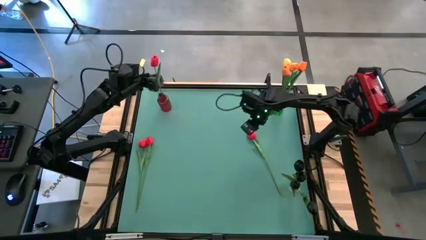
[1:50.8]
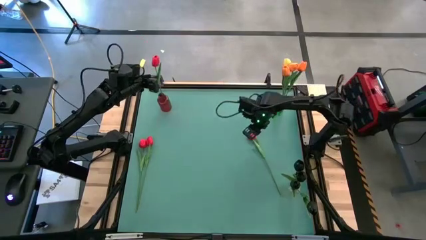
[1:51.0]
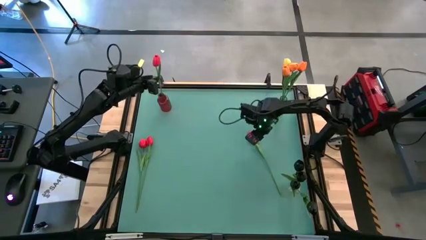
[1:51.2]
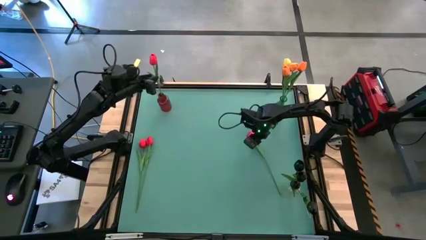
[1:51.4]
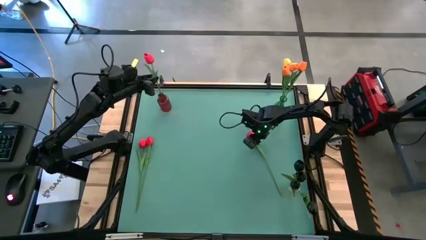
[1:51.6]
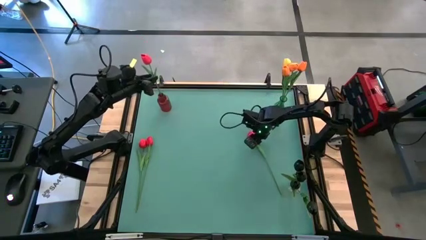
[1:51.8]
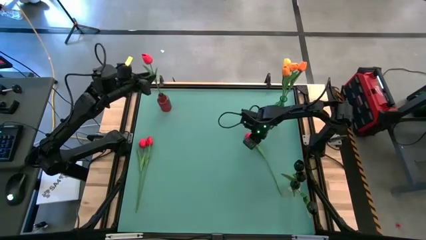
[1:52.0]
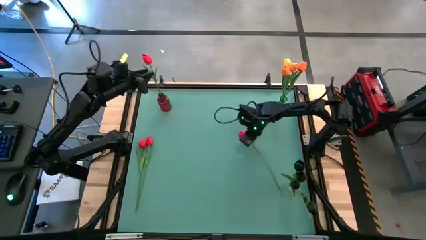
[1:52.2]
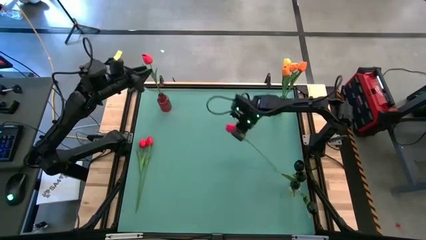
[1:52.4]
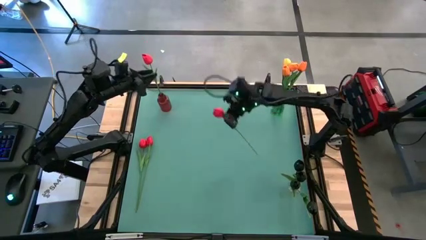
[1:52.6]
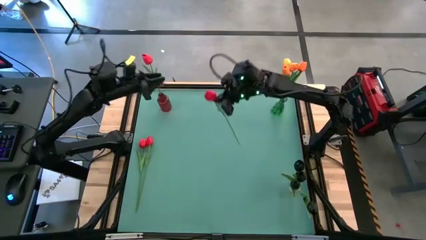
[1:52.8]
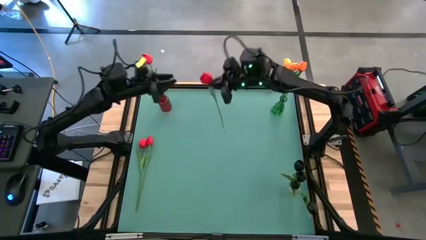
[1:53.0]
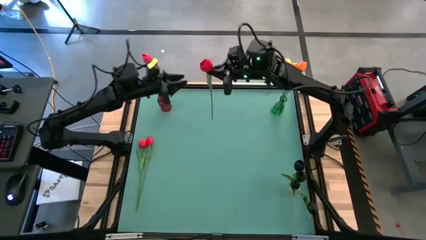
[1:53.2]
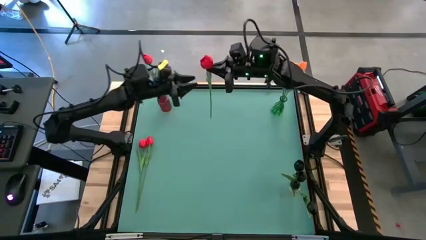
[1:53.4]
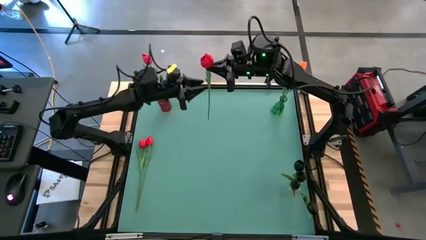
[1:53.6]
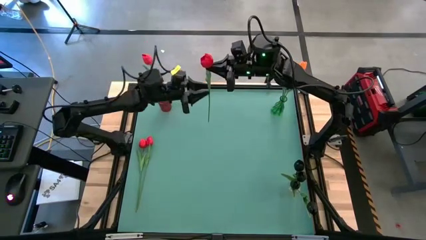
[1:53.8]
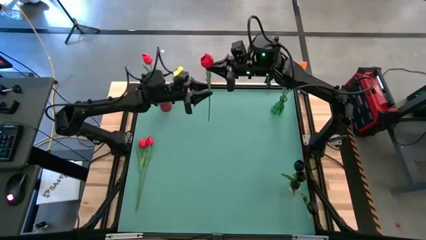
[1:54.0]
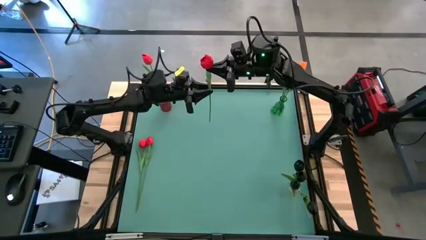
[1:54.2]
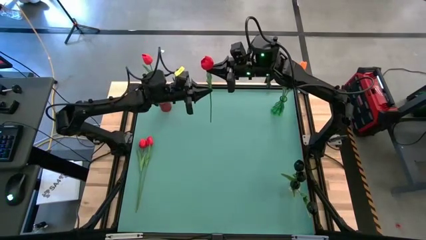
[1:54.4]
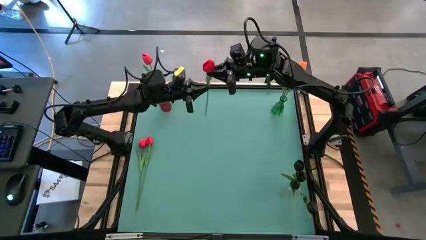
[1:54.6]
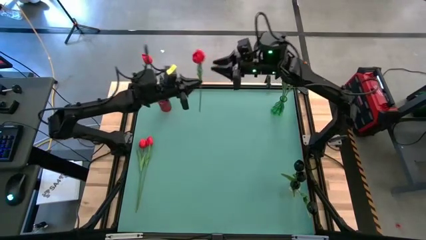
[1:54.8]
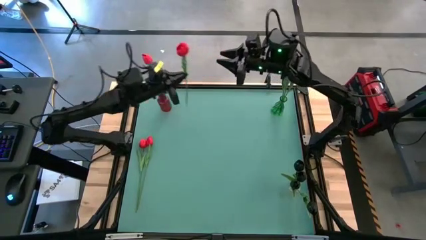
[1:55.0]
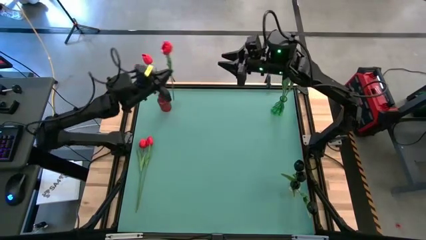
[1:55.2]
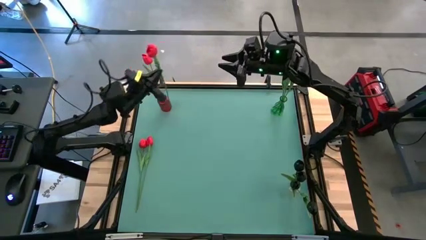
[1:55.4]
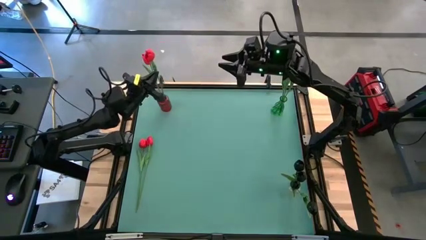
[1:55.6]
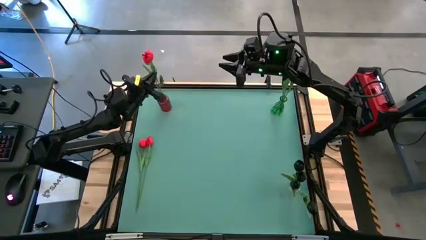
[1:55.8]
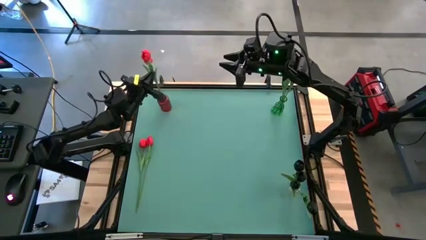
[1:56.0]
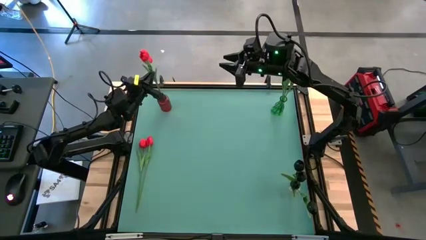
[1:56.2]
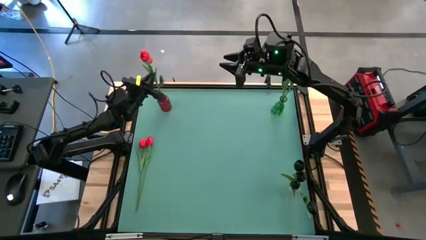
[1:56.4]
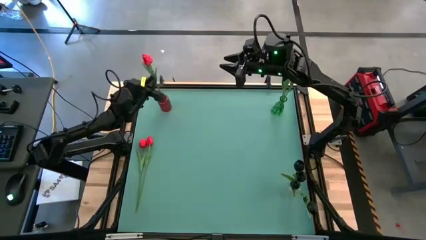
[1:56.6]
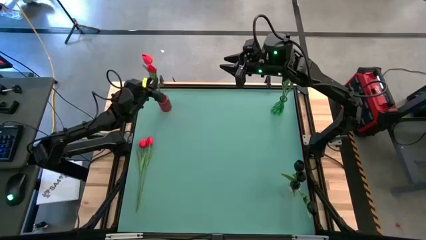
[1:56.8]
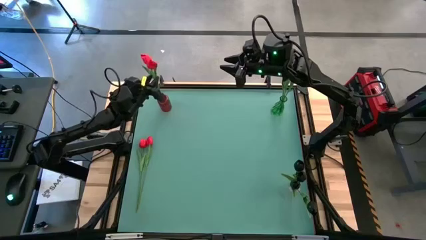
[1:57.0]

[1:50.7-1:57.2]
Task: Sort flowers into vase by color
Put the right red tulip into the red flower vase

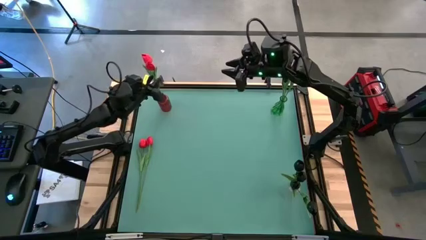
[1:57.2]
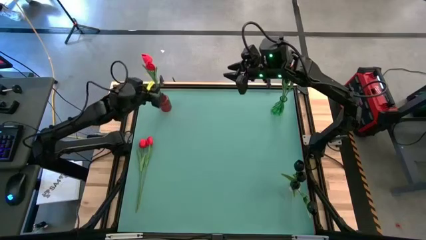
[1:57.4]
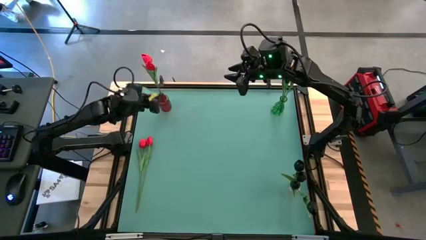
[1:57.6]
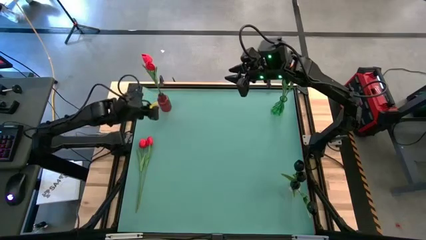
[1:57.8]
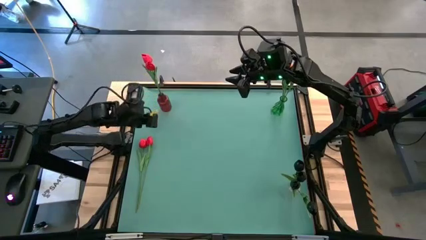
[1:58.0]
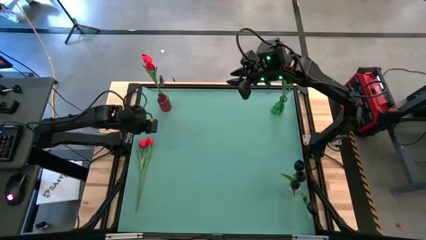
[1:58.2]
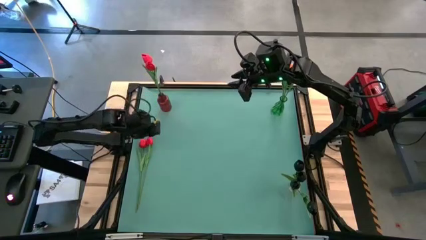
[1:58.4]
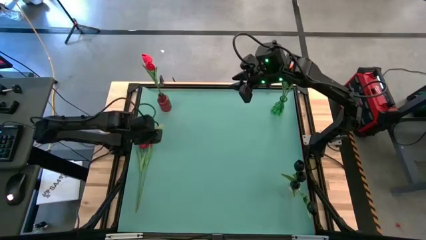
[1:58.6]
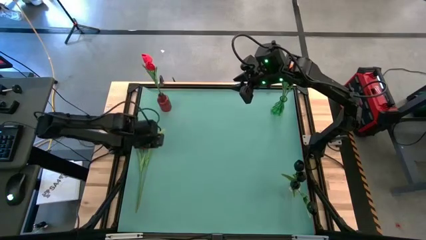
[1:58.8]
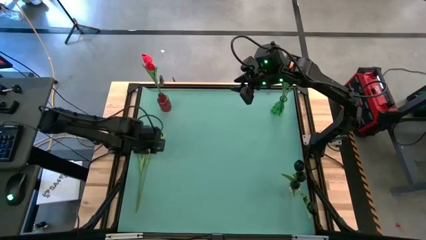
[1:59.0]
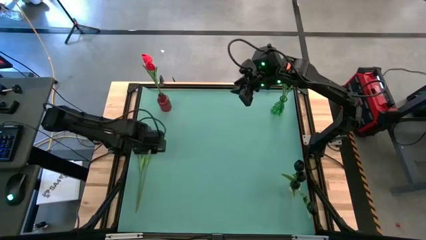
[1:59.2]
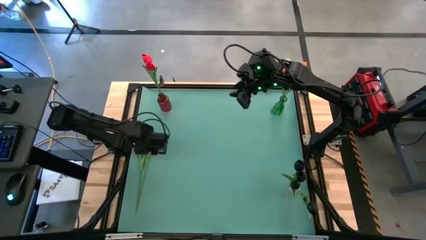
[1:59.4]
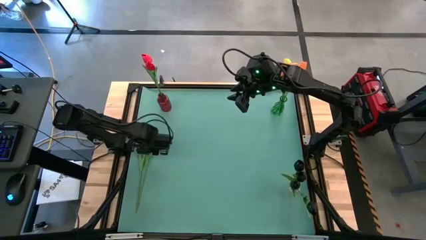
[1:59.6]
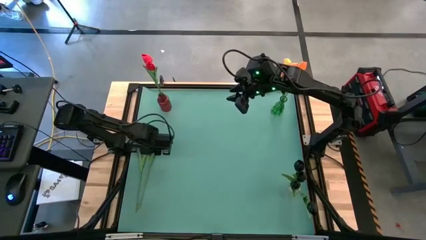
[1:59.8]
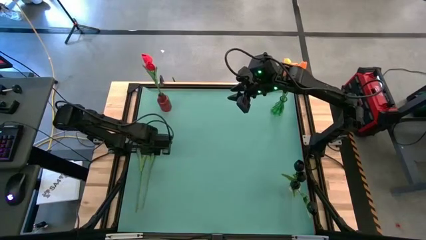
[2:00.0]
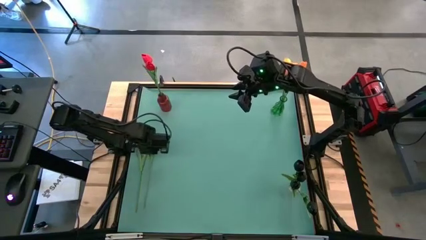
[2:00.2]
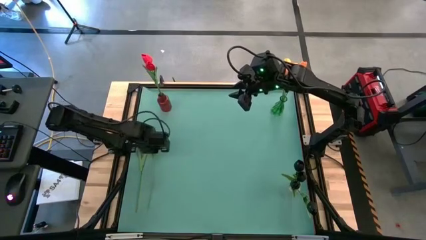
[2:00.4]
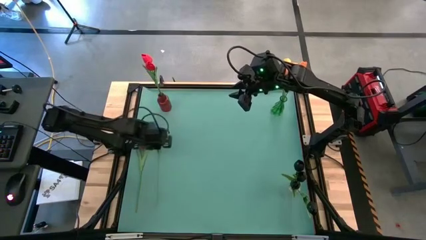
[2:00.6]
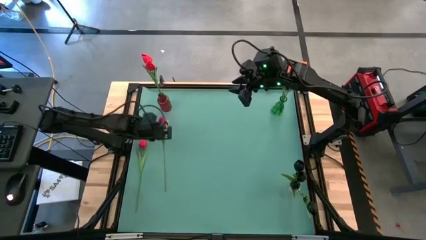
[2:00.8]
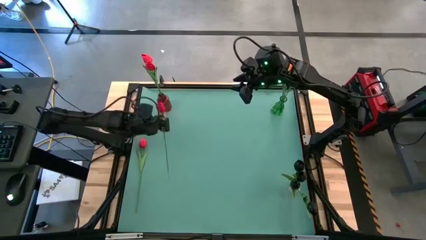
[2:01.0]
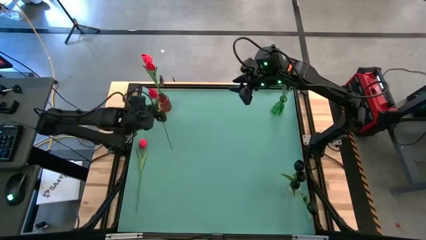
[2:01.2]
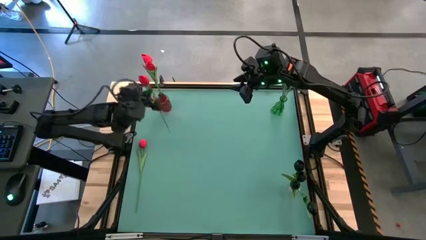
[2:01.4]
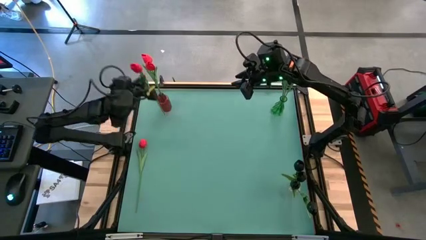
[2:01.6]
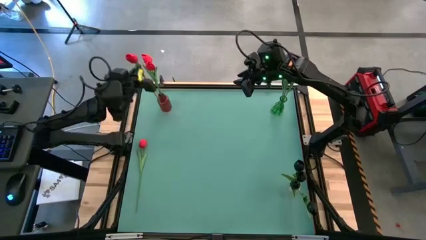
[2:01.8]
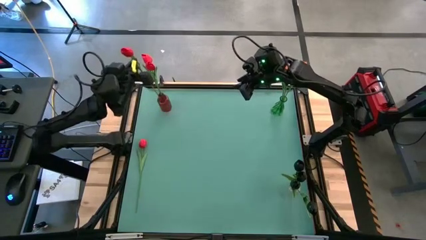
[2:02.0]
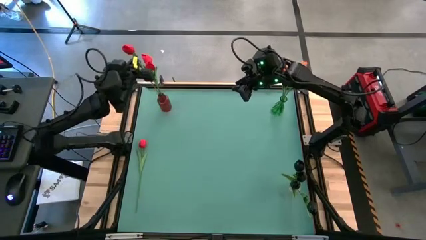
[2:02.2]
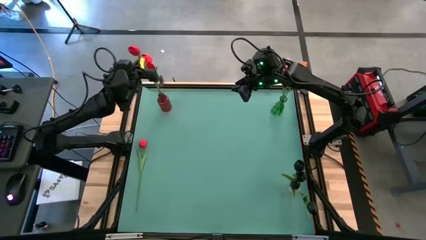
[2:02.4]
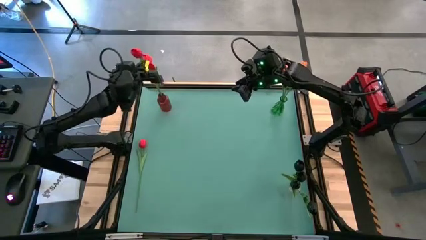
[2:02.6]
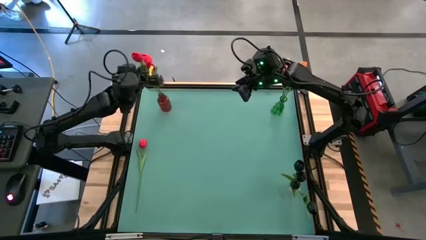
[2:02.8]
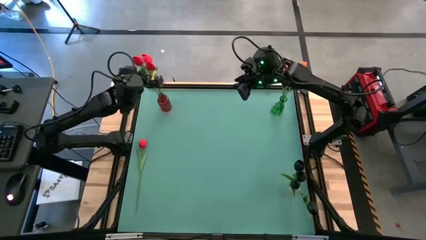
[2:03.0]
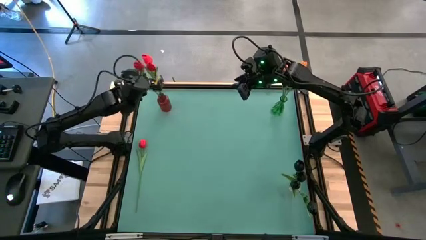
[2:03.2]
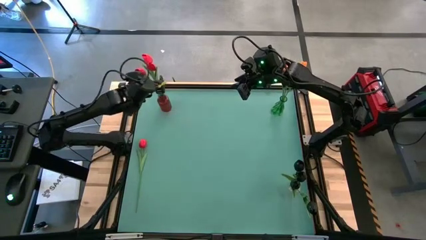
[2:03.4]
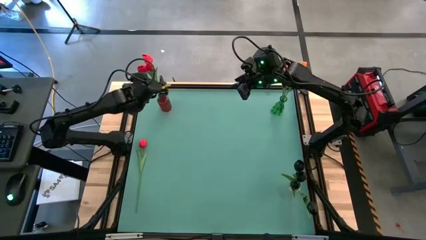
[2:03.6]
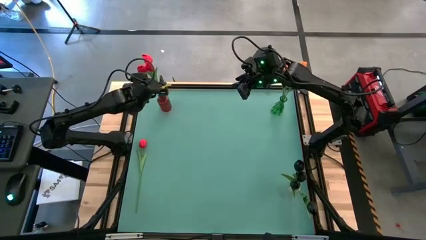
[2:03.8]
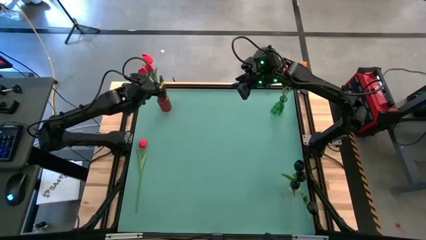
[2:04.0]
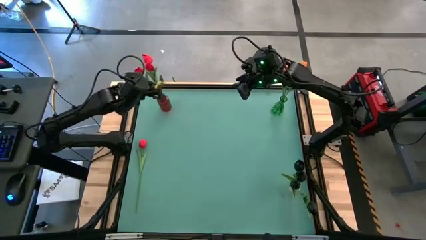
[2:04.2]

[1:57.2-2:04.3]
Put the right red tulip into the red flower vase

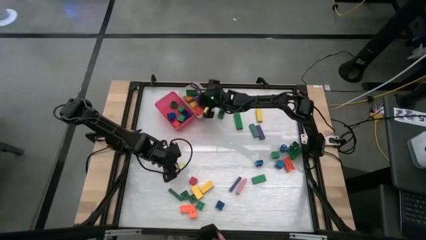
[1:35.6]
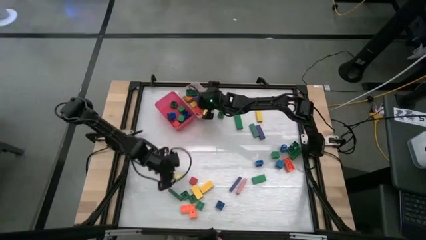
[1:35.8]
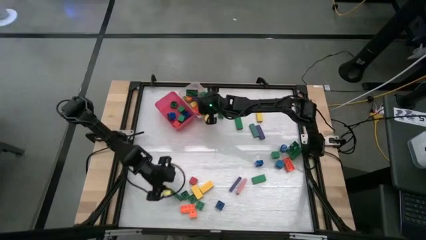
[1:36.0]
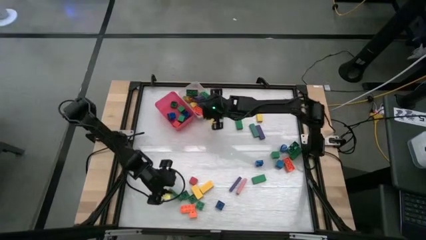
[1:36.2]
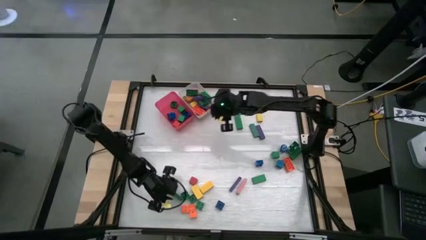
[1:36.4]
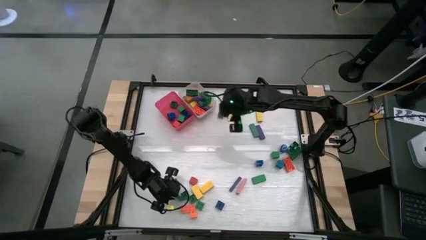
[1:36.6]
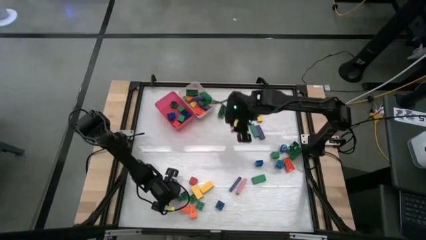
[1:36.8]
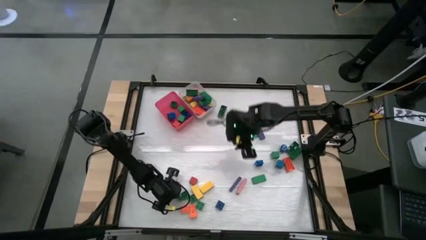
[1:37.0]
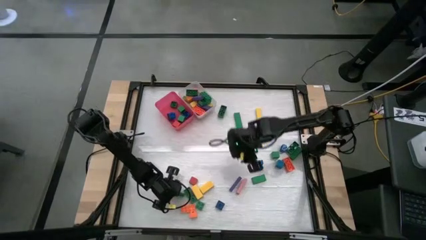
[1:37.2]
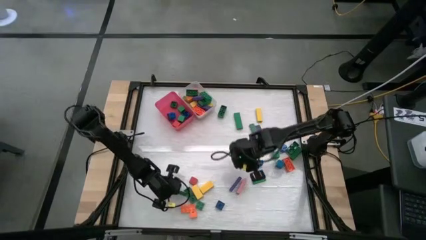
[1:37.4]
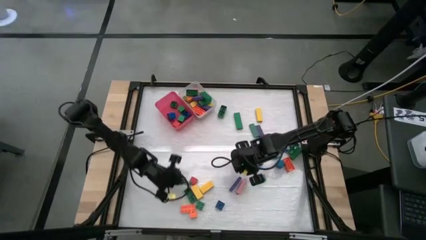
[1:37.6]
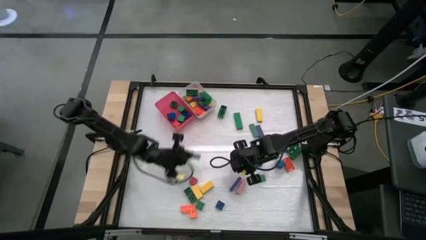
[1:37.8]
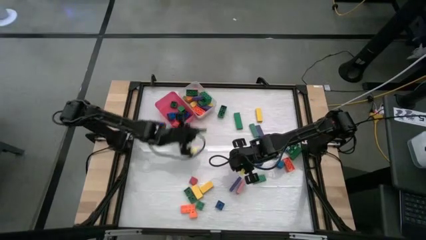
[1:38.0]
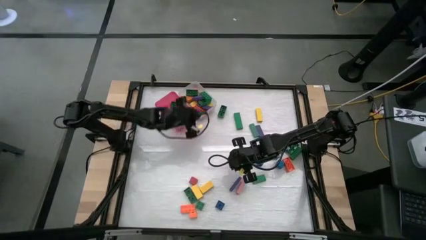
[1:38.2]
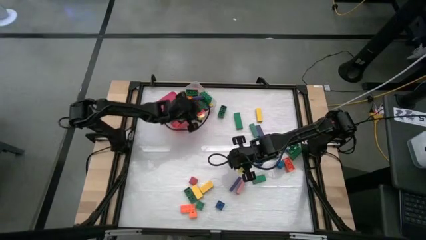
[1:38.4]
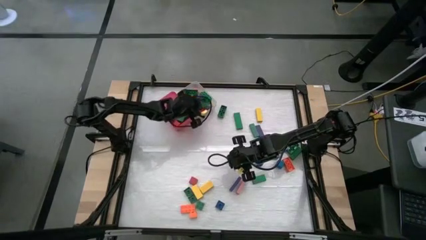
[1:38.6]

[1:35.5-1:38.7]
Task: Sort blocks by size
Put the big green block into the white bin
